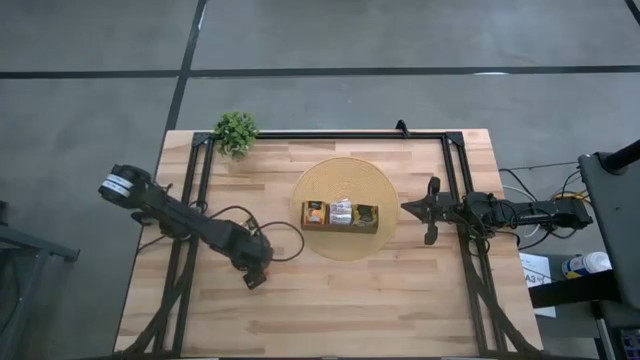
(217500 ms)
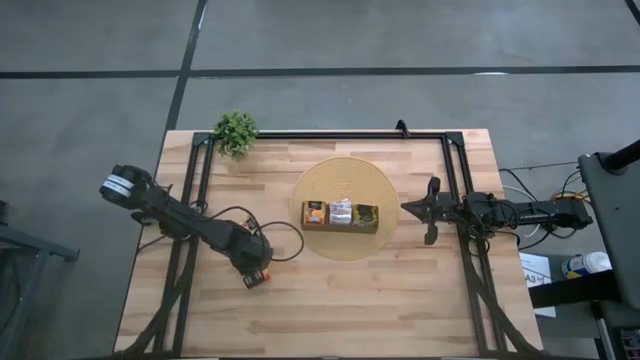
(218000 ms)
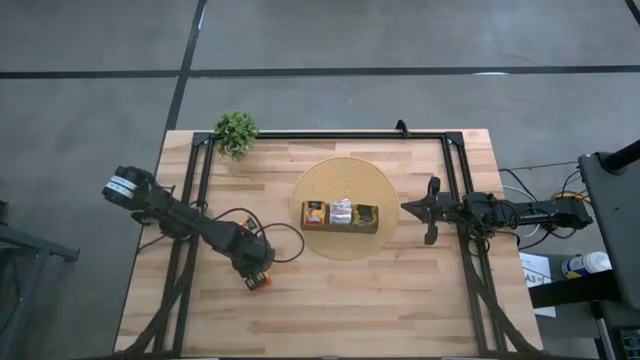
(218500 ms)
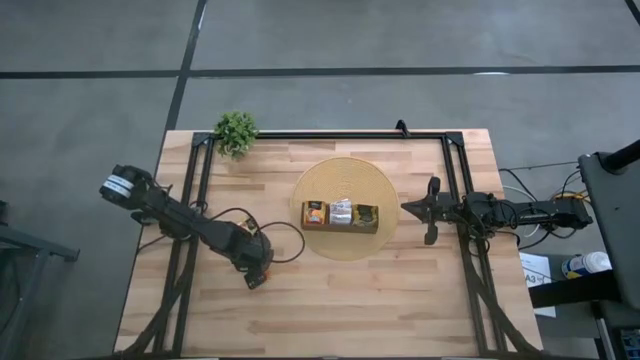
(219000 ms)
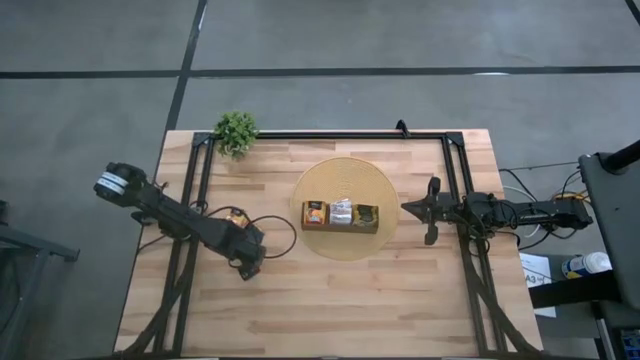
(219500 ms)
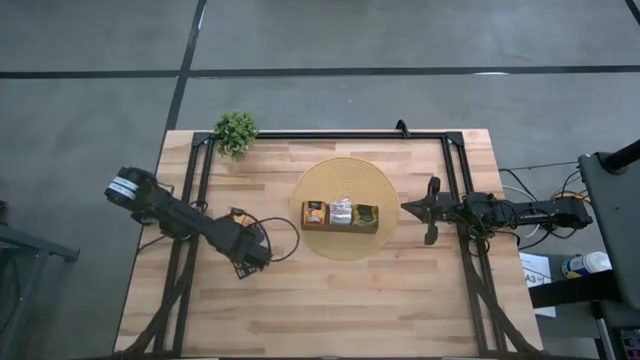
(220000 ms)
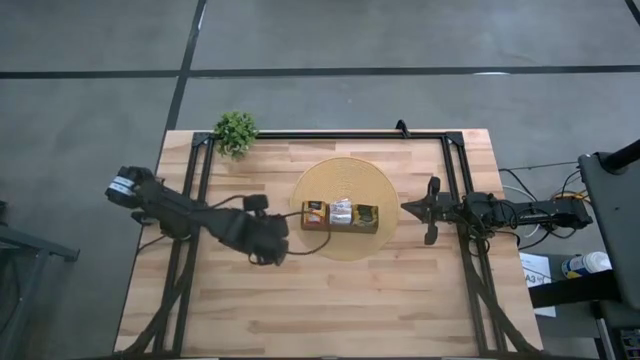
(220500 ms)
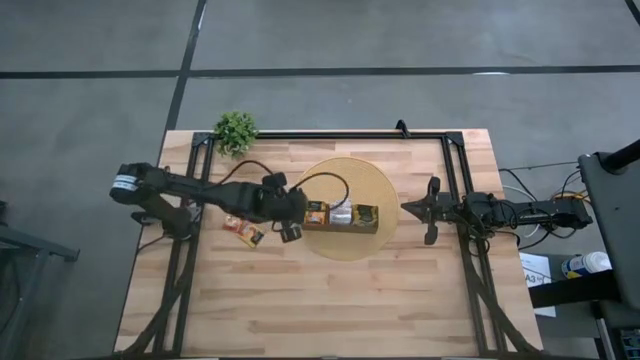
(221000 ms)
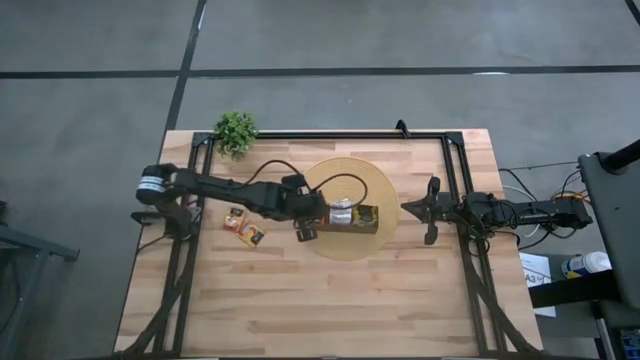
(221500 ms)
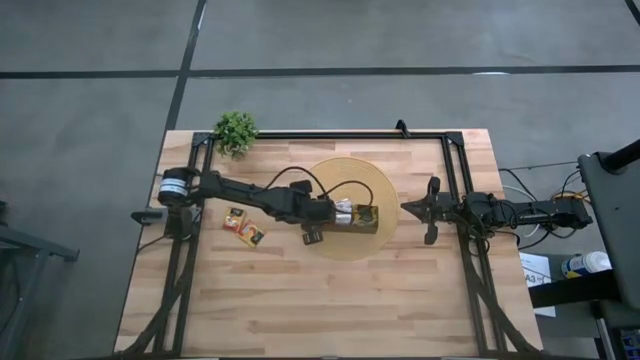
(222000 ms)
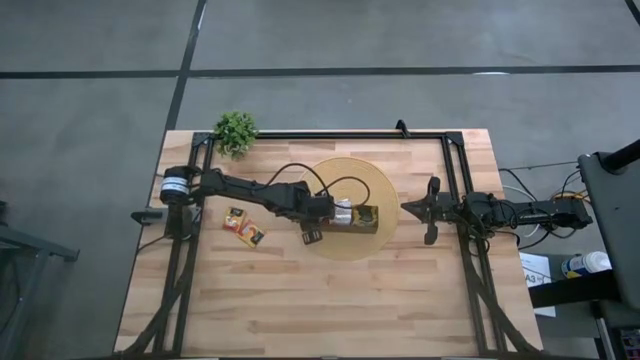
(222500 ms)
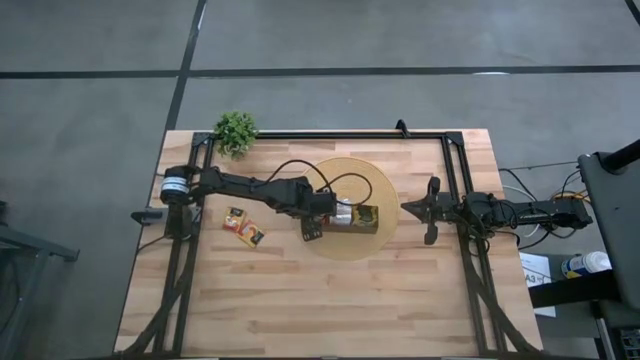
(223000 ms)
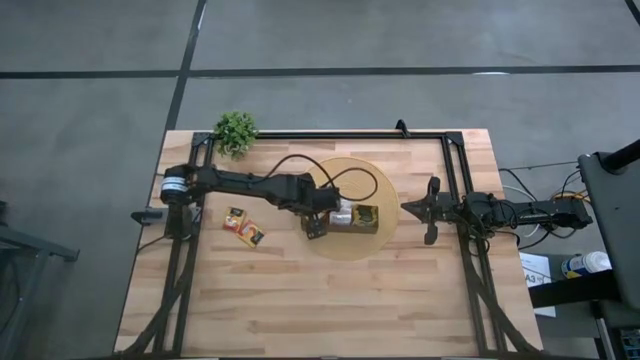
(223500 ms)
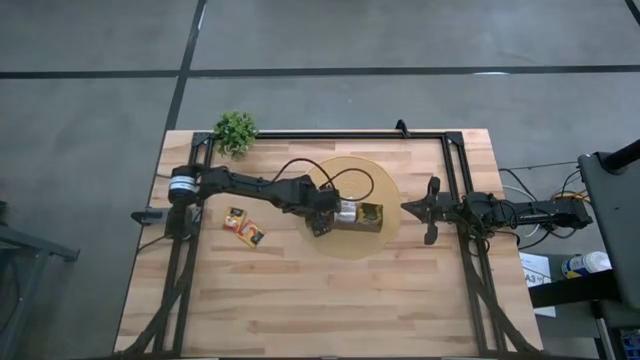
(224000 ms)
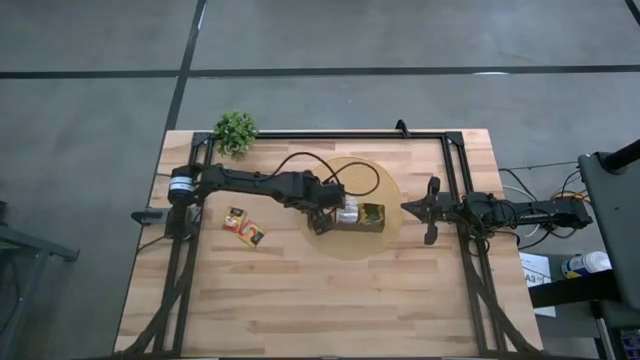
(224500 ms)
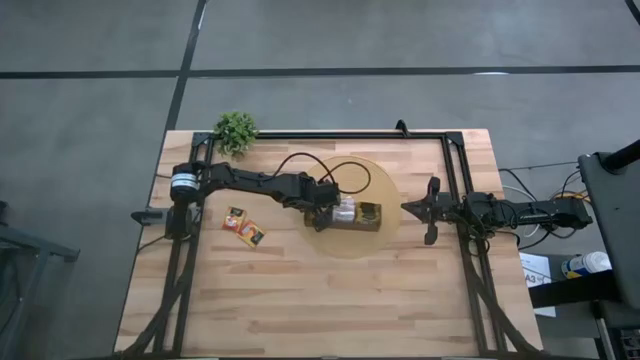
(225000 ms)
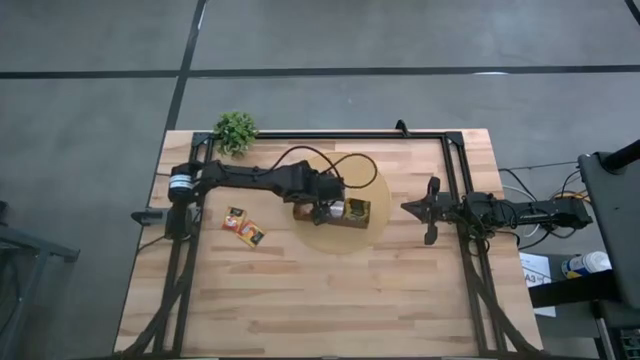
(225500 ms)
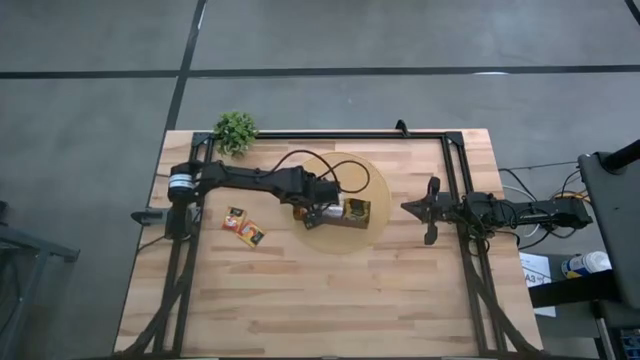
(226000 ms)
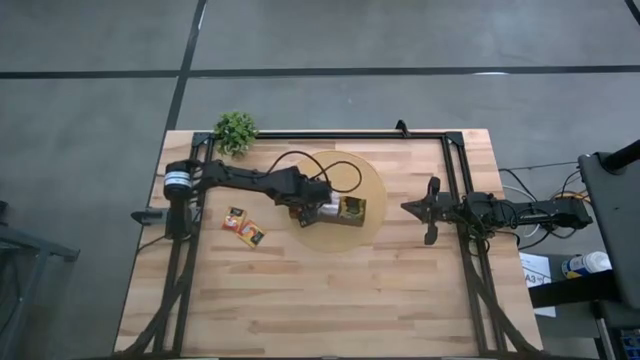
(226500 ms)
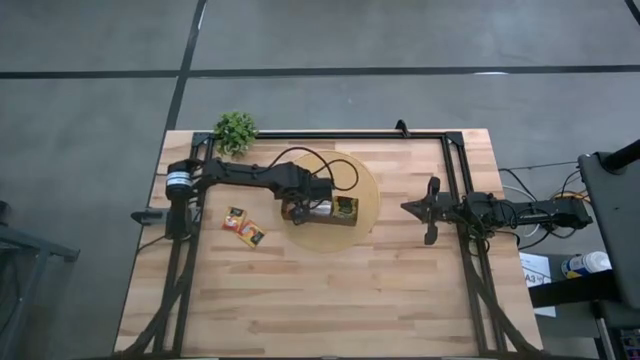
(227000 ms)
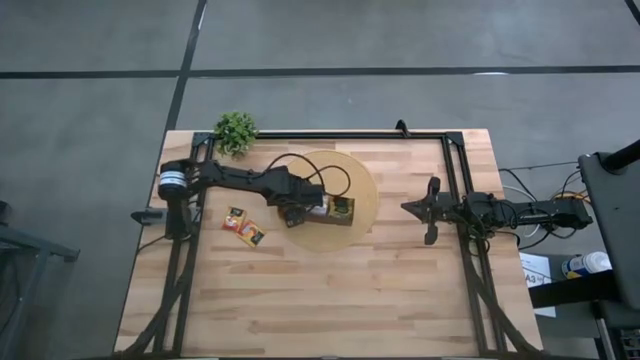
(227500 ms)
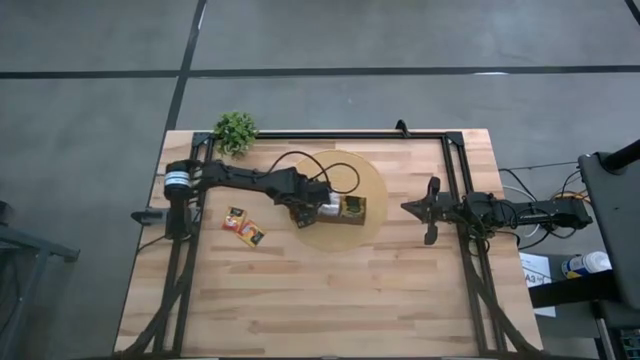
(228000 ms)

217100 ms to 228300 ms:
Task: Pick & Place Tea
Put the orange tea bag into the left section of the wooden organizer

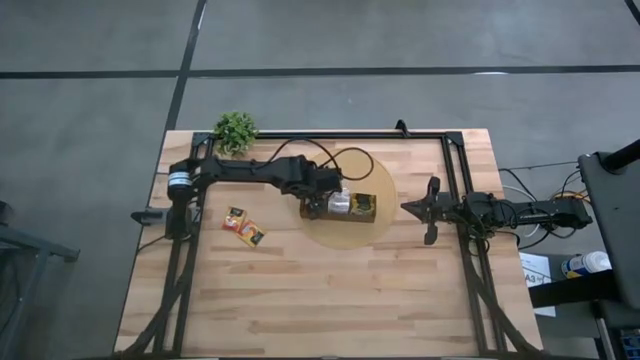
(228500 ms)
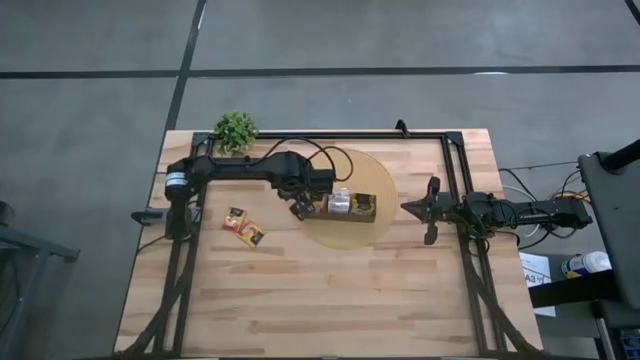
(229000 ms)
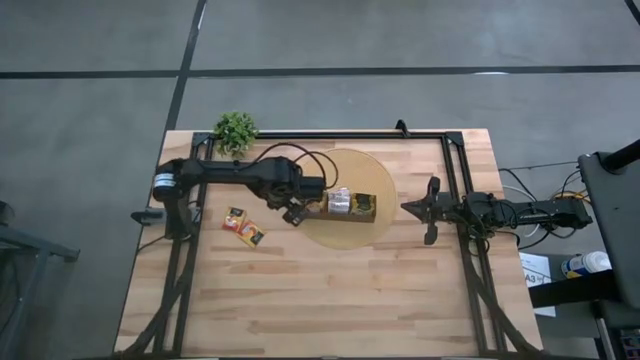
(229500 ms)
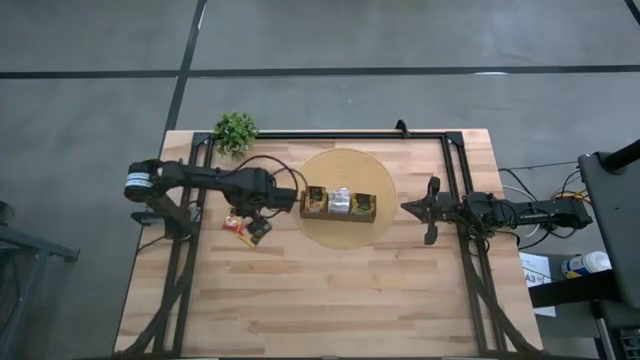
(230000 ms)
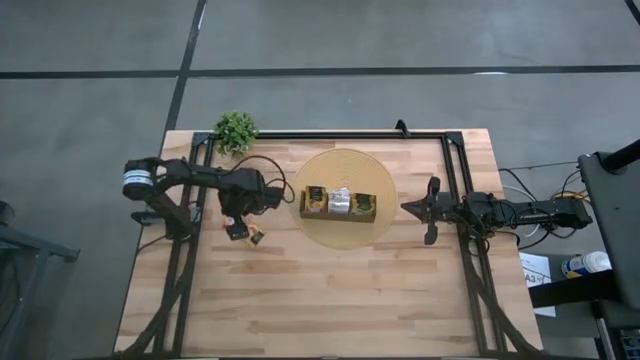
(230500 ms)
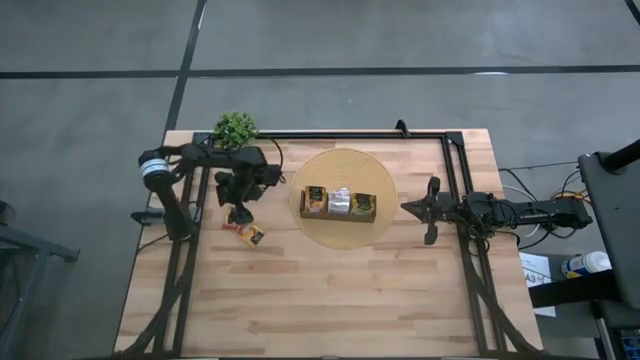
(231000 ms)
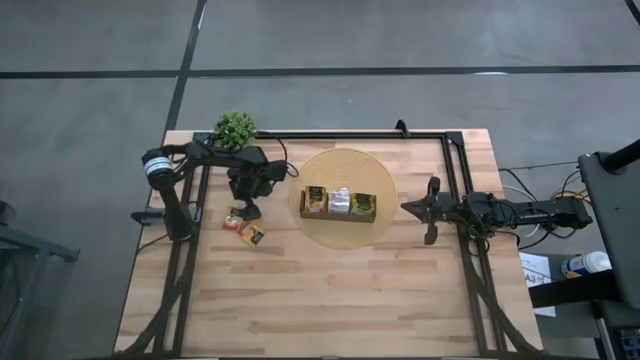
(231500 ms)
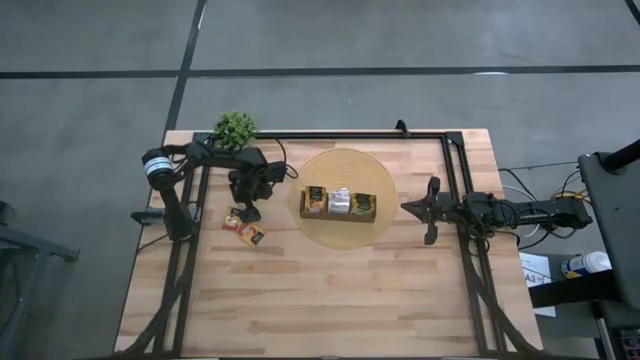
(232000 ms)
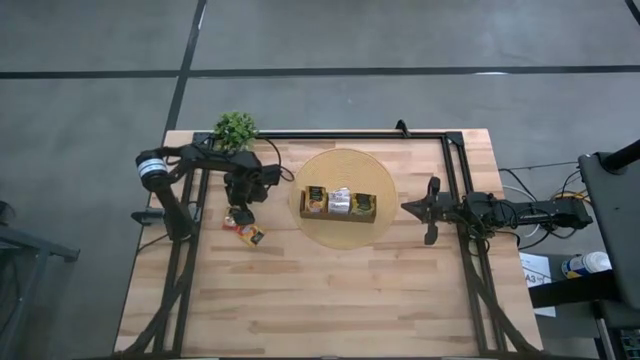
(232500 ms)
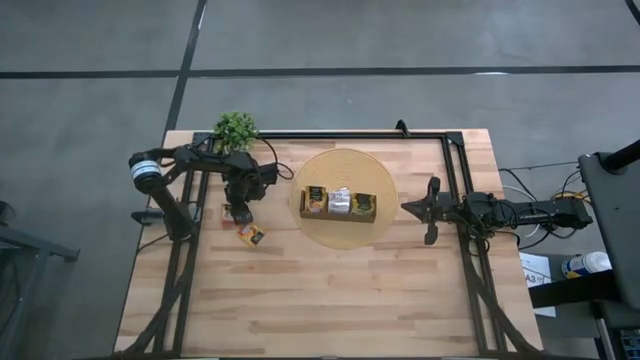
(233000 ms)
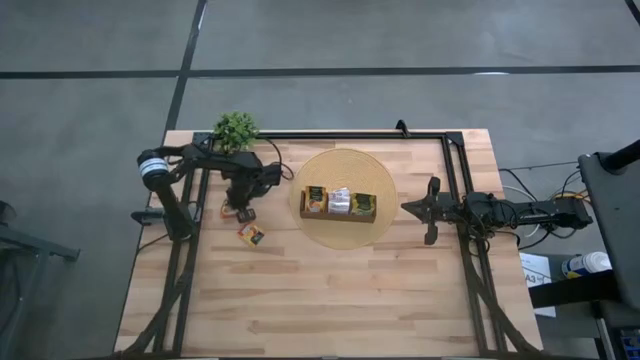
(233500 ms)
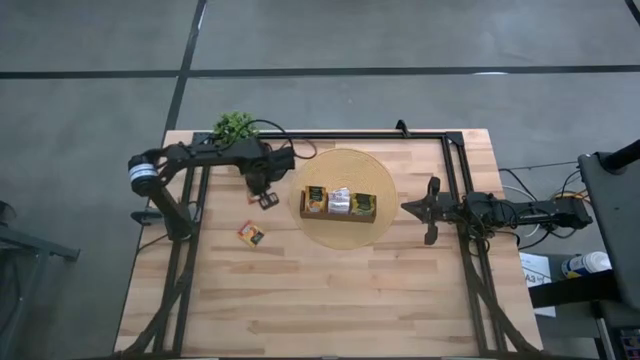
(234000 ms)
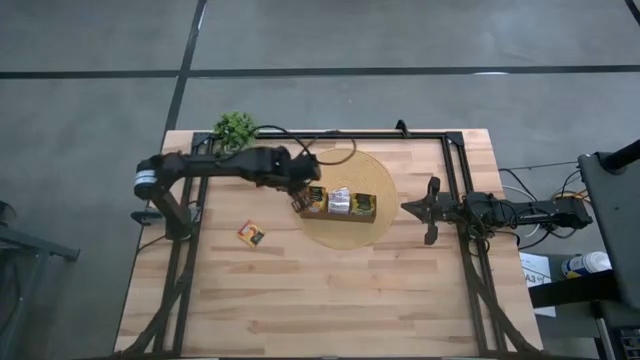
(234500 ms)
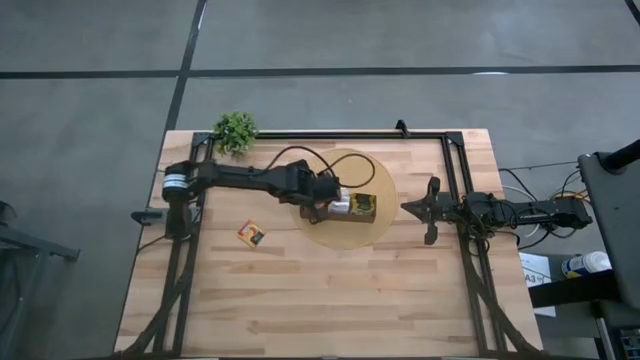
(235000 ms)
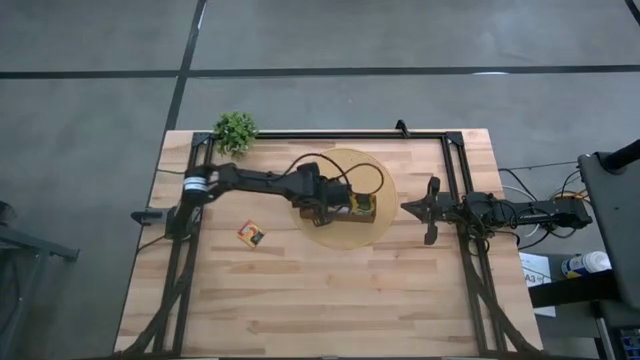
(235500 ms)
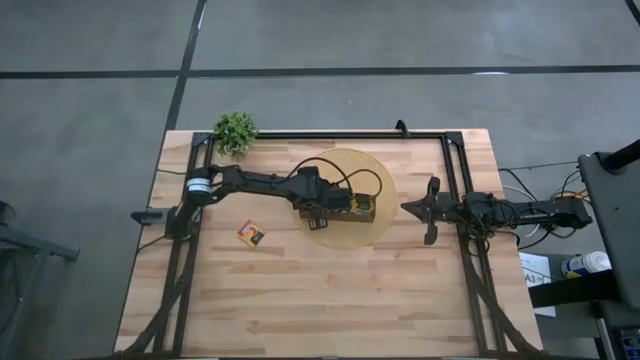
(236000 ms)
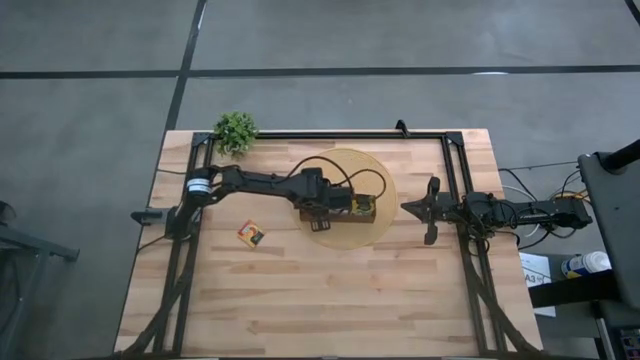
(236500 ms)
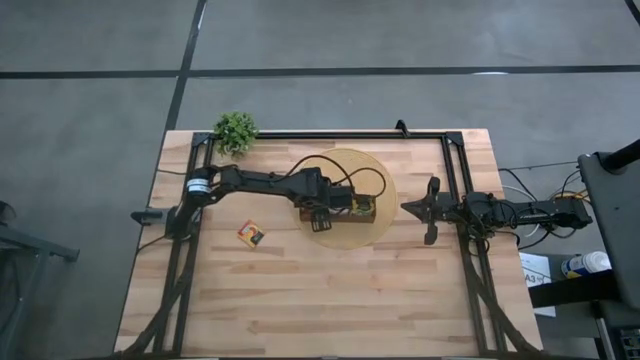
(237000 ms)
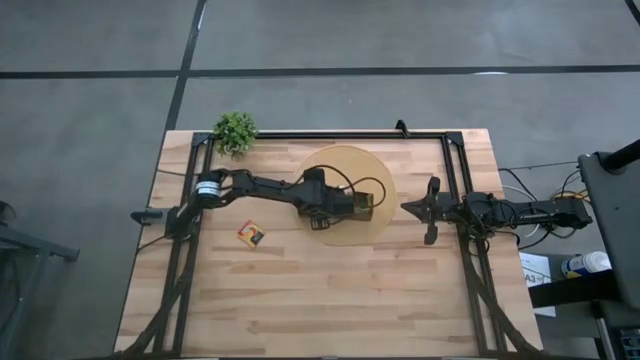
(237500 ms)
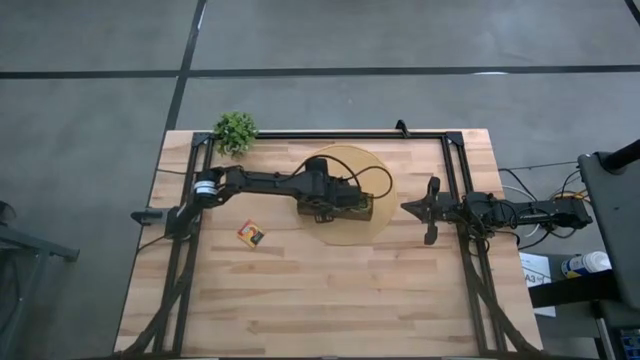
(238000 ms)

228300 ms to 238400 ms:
Put the orange tea bag into the left section of the wooden organizer
